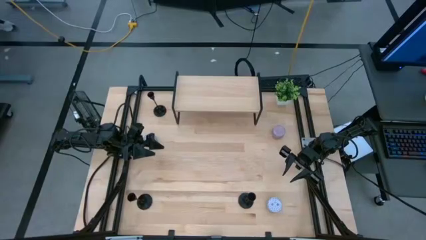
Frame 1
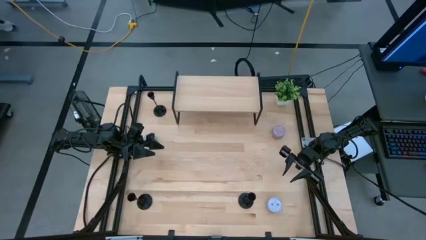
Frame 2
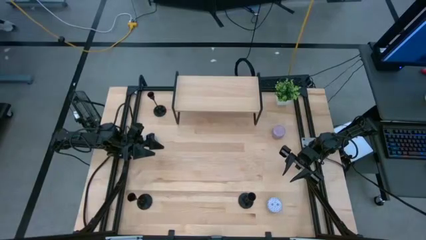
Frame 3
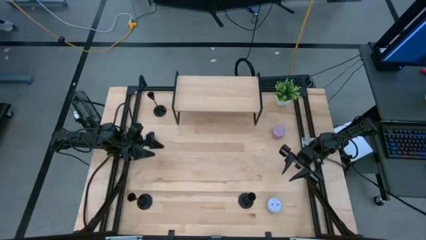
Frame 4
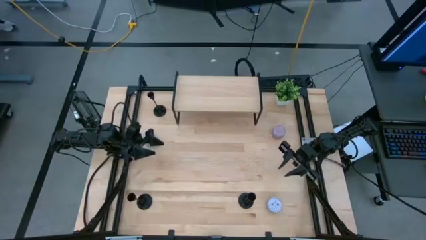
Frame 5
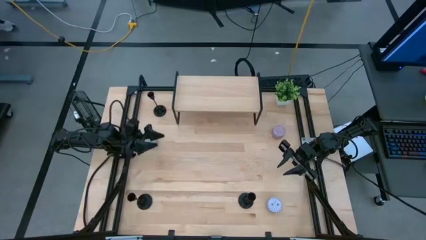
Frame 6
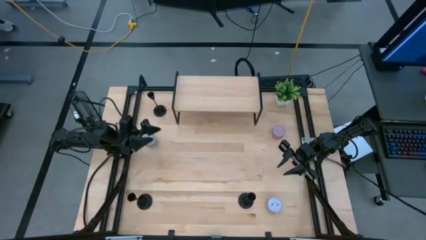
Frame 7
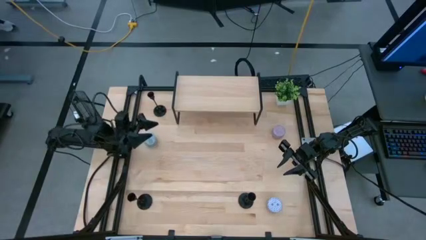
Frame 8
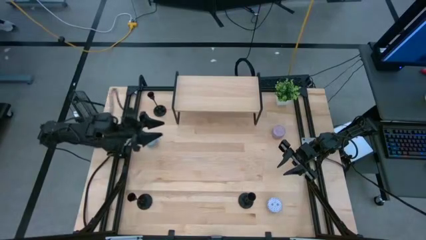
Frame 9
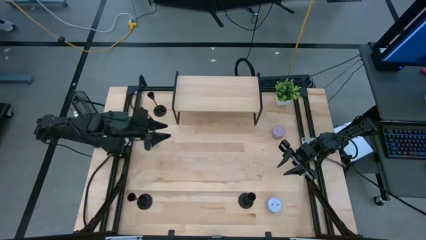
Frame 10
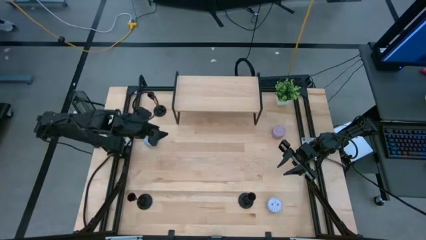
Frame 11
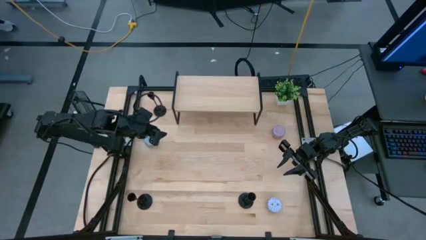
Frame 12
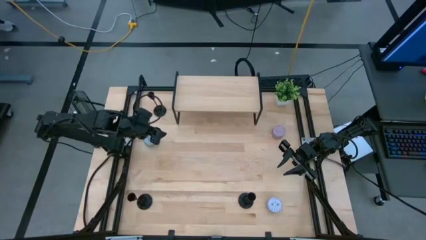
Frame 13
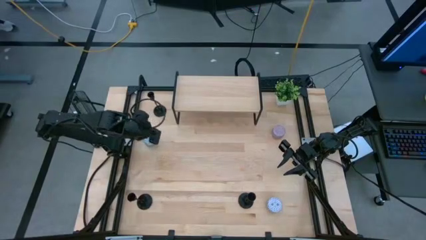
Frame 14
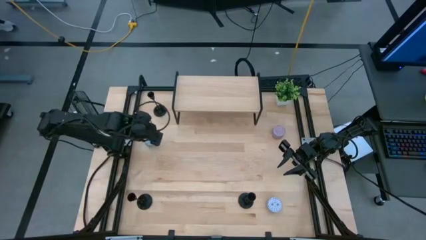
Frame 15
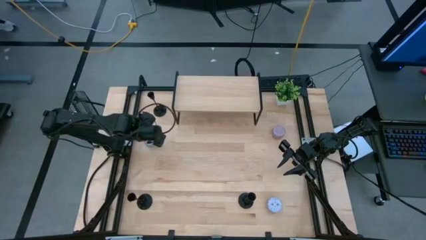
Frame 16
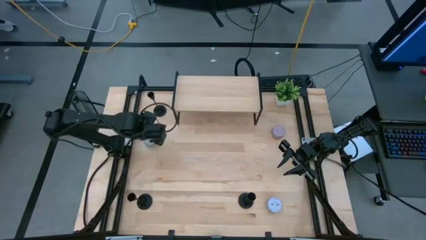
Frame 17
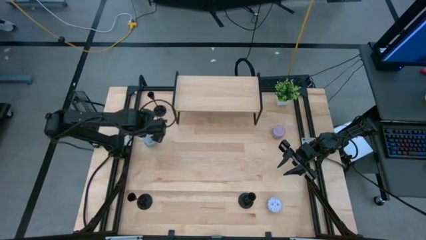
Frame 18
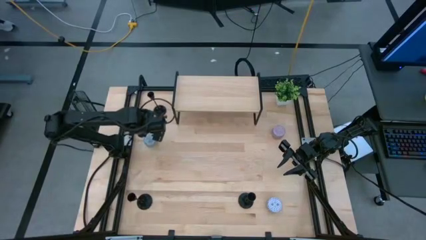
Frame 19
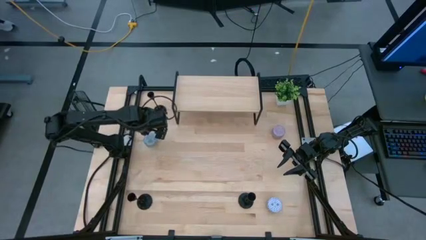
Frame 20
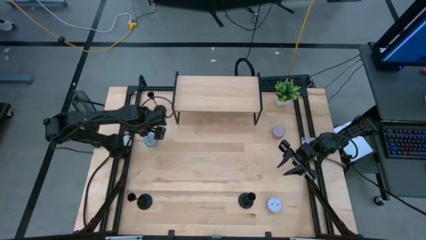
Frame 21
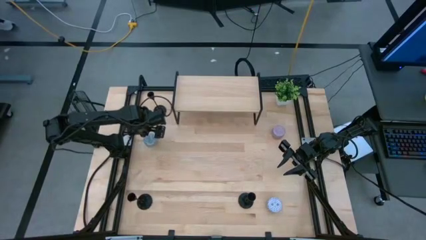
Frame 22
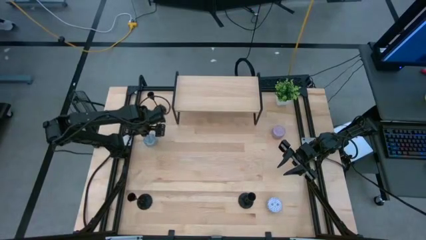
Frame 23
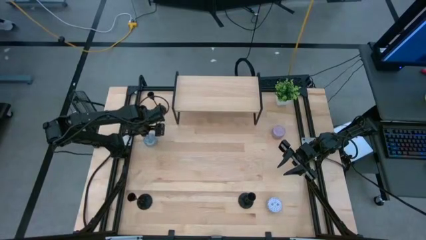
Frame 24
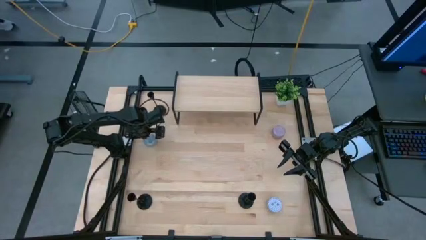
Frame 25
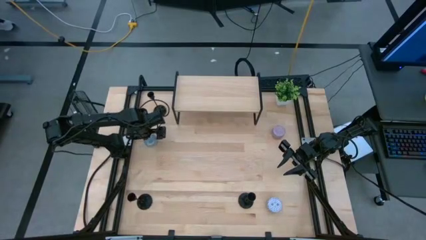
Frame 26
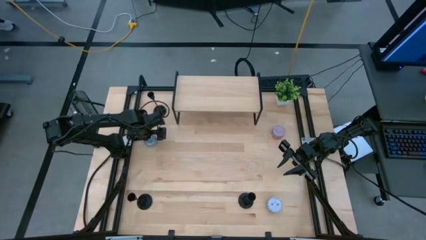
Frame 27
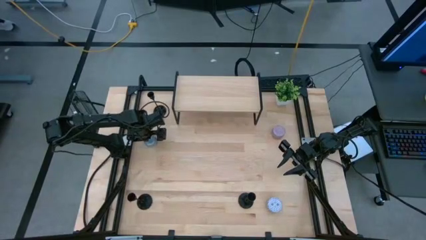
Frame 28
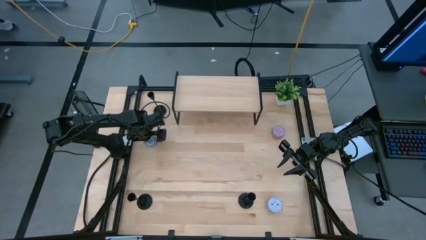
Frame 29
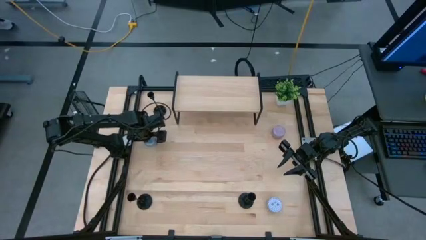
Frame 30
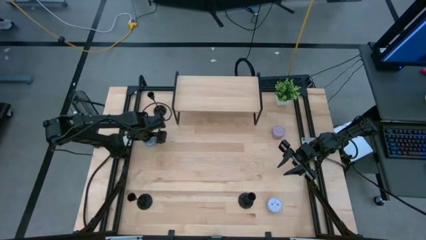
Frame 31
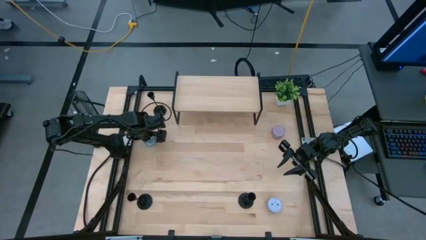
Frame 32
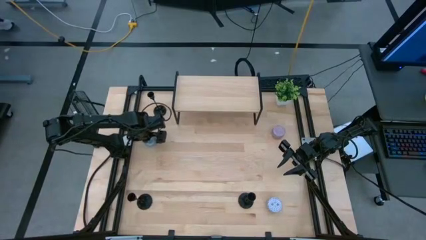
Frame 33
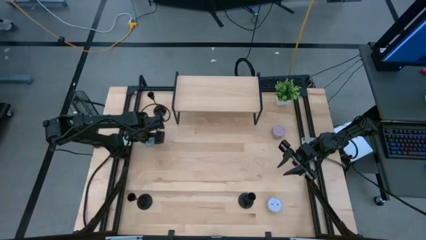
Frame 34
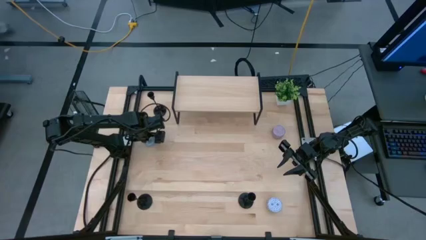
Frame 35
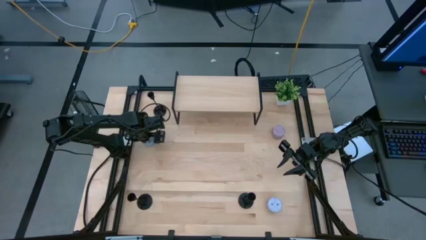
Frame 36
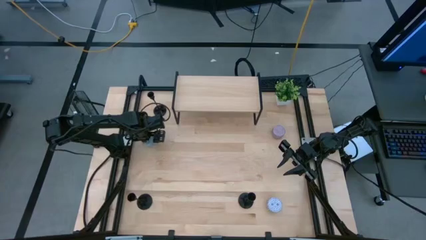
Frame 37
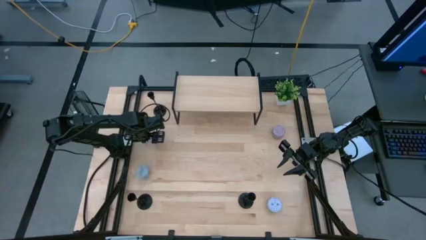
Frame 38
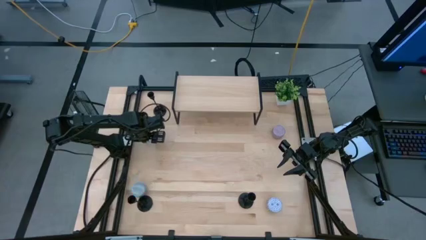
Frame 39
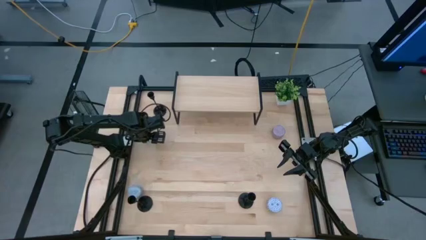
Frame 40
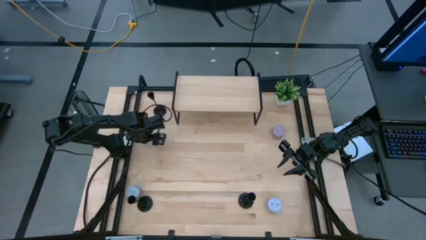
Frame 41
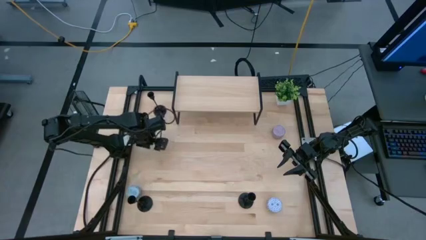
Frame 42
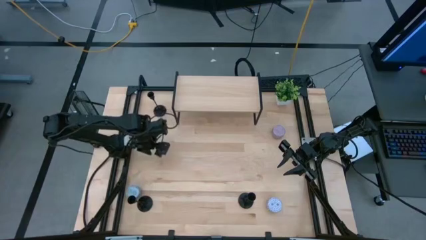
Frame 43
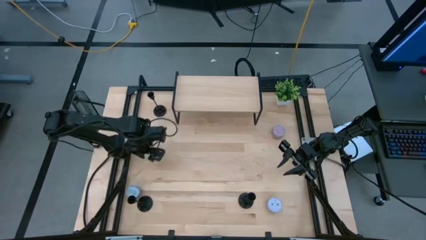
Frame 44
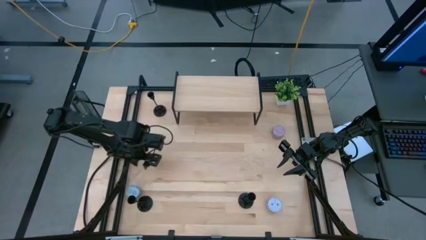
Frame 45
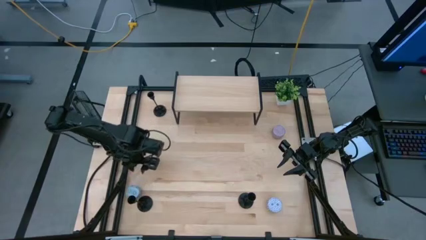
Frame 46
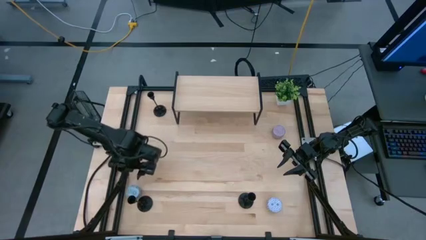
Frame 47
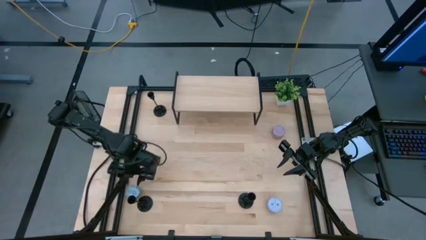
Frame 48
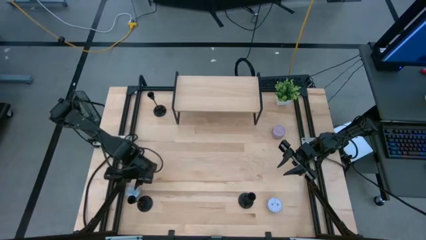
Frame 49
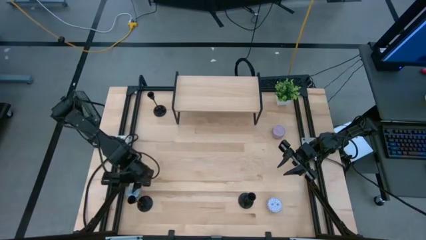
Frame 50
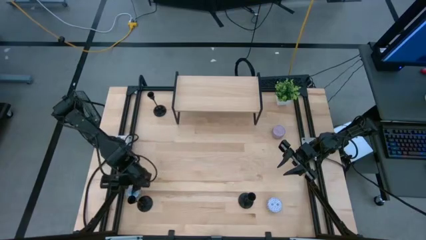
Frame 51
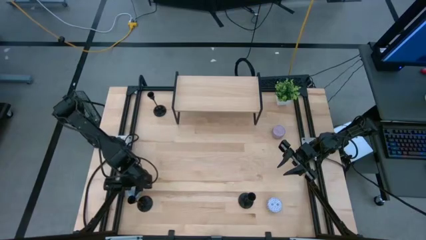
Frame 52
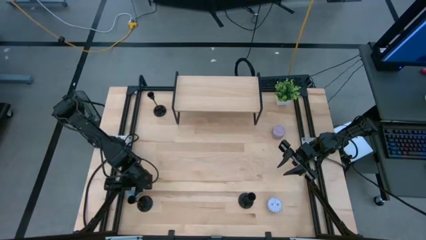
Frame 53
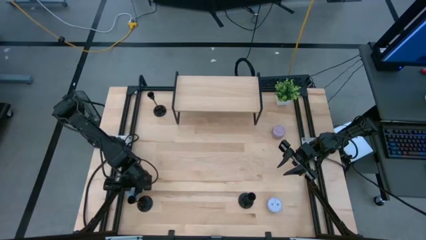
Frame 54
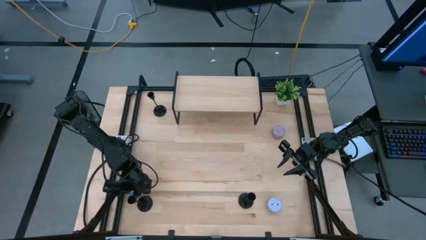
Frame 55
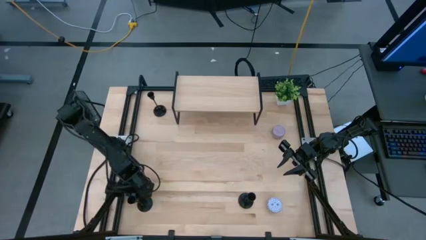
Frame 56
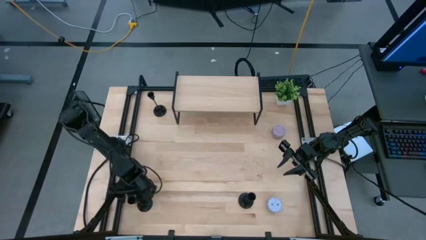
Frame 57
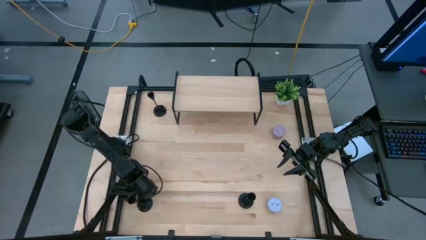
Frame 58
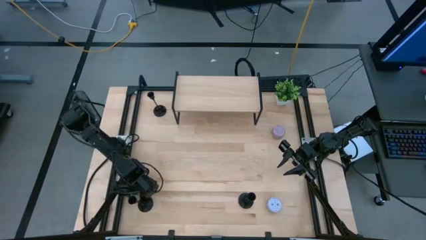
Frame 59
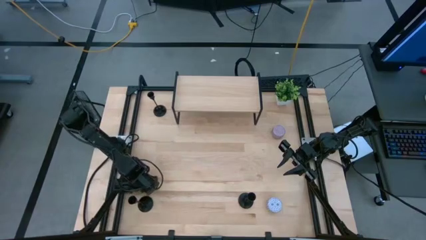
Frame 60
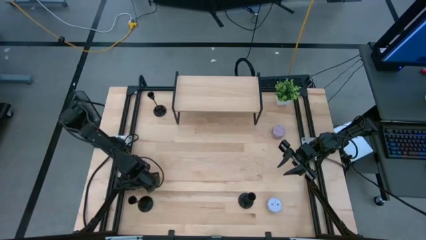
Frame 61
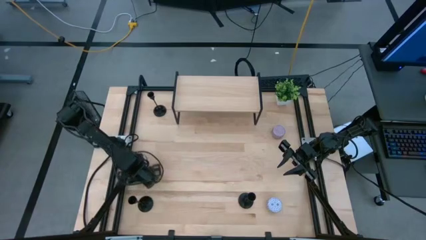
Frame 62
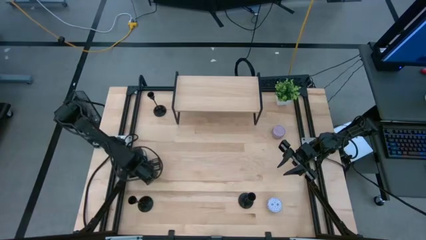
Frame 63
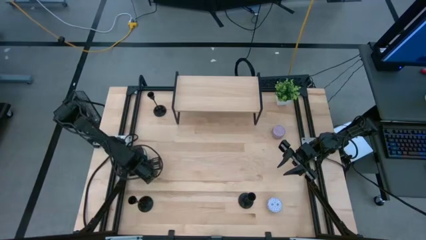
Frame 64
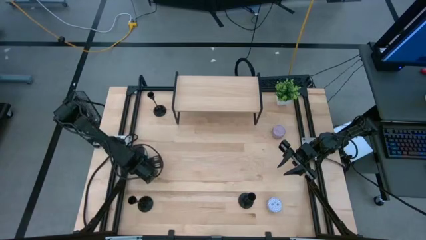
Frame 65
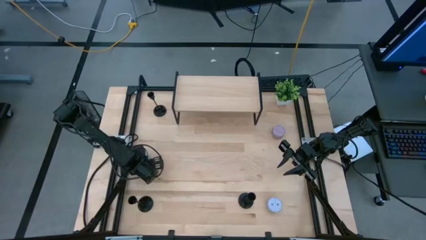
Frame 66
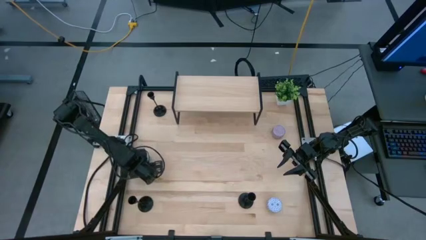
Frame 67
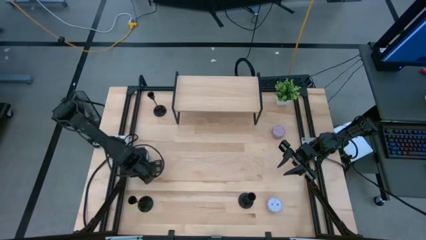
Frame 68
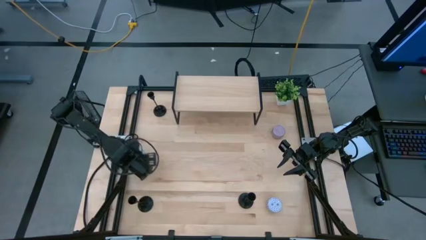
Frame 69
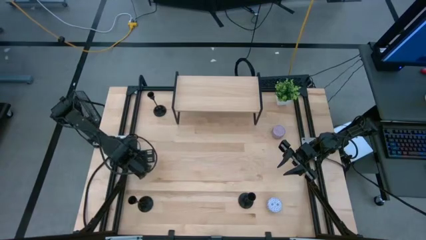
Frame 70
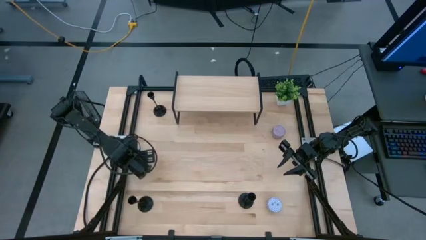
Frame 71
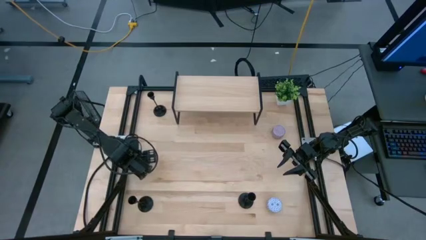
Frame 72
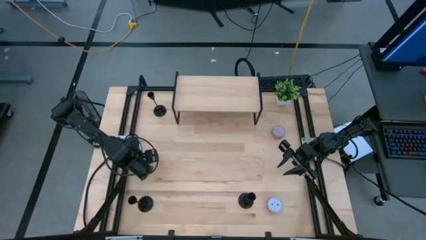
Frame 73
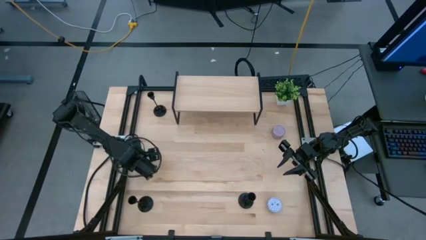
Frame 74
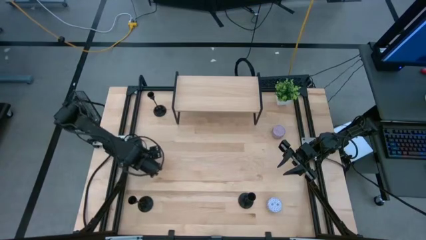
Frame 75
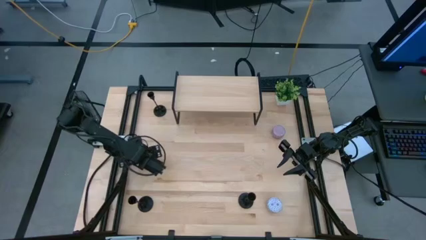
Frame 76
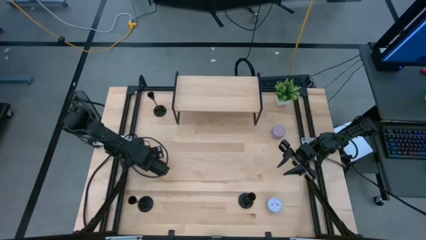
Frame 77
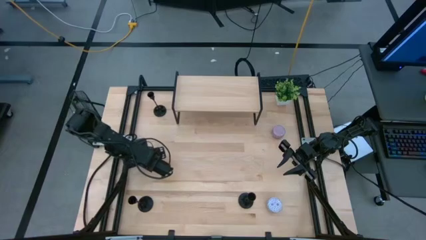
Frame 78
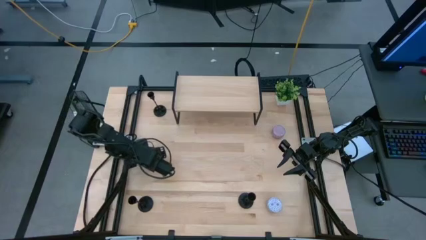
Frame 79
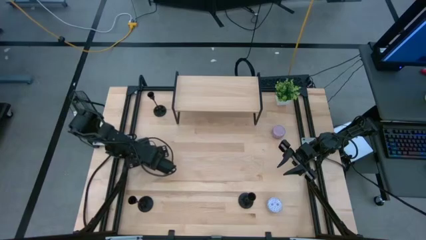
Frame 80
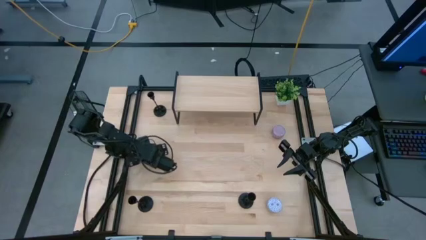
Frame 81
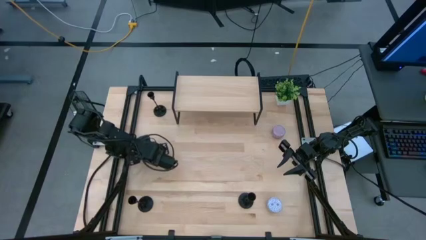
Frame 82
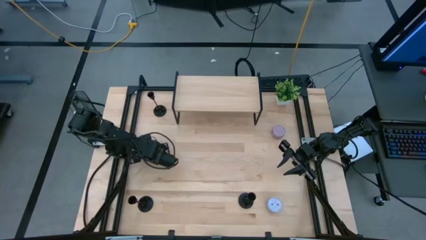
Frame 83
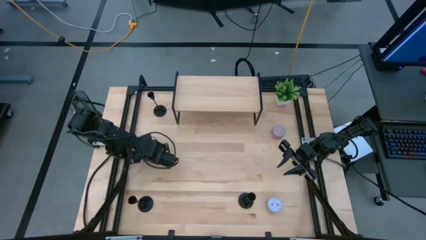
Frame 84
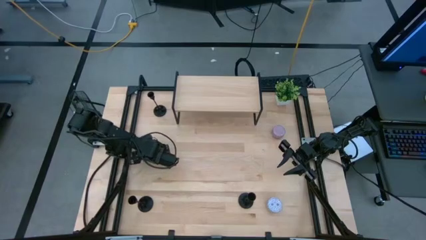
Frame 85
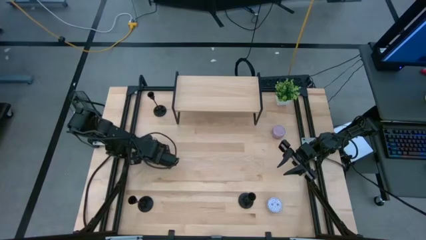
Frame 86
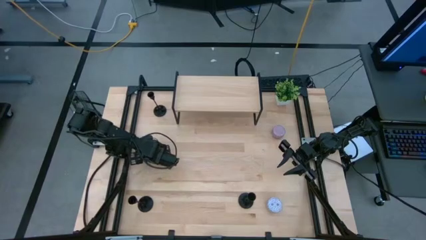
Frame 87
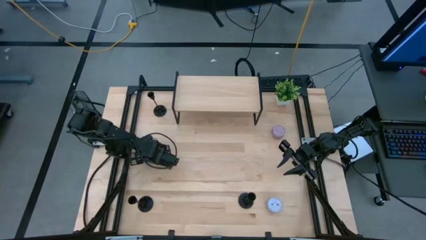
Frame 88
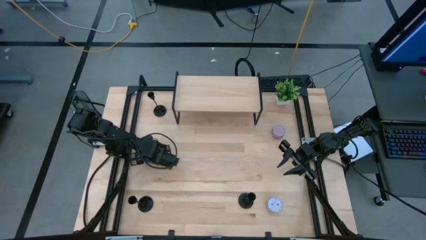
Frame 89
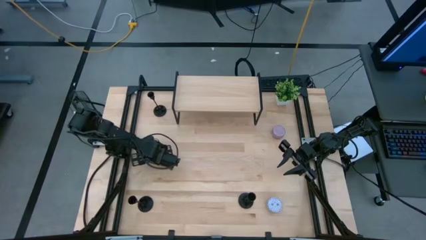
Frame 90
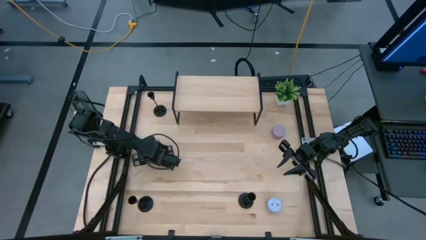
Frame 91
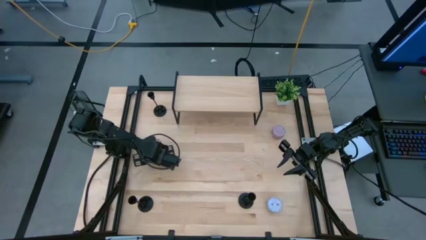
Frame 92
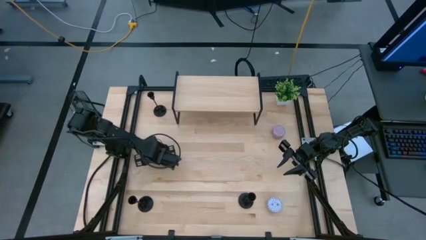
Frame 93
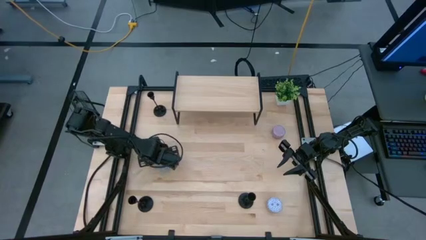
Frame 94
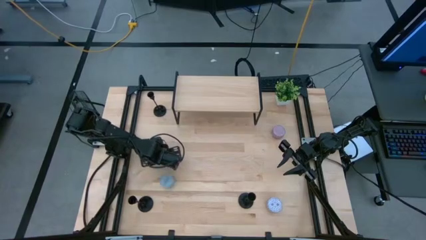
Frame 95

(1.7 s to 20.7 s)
Task: Pick & Place candle stick holders
Put the blue patterned scented candle on the shelf
